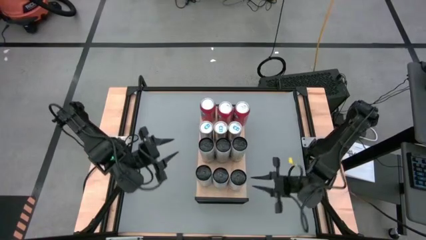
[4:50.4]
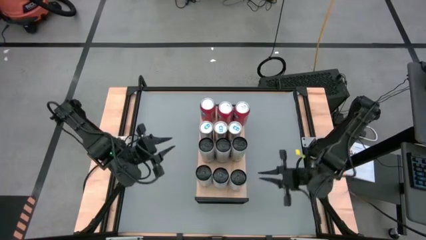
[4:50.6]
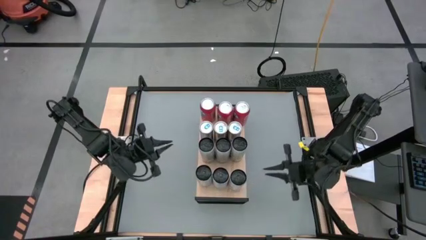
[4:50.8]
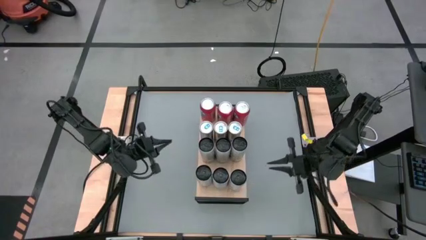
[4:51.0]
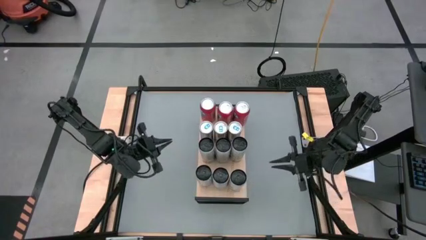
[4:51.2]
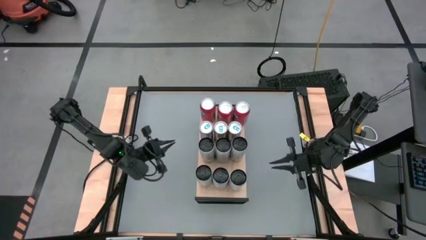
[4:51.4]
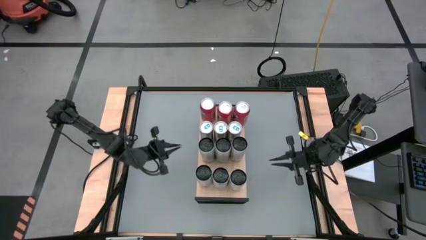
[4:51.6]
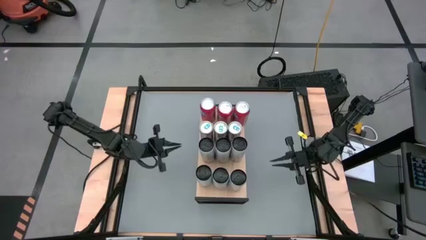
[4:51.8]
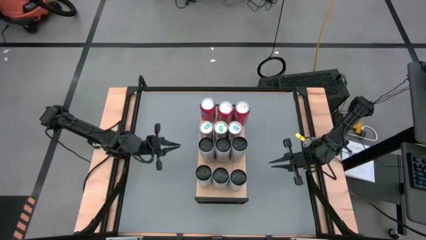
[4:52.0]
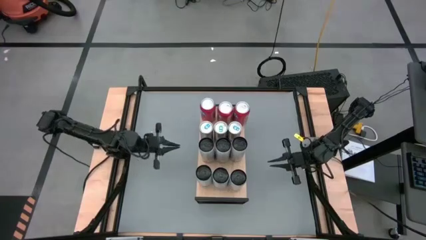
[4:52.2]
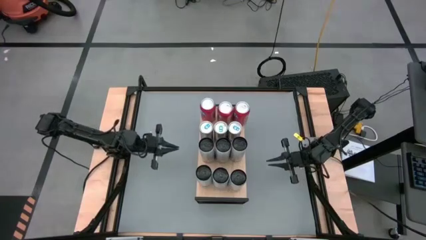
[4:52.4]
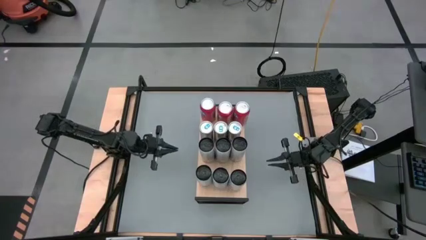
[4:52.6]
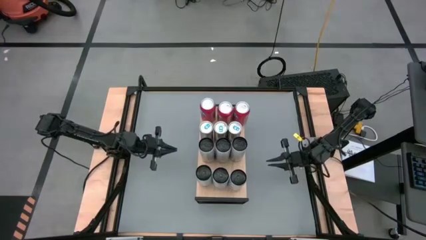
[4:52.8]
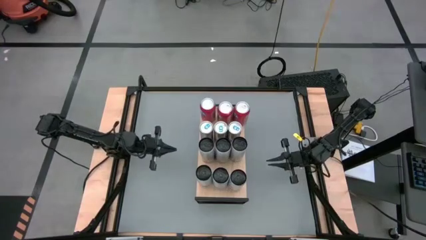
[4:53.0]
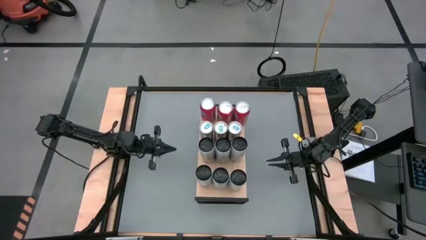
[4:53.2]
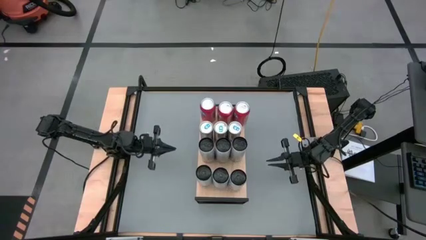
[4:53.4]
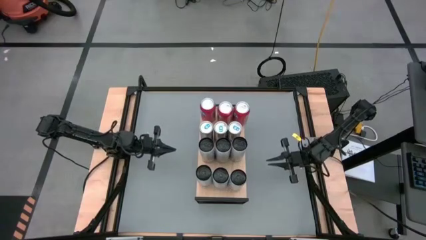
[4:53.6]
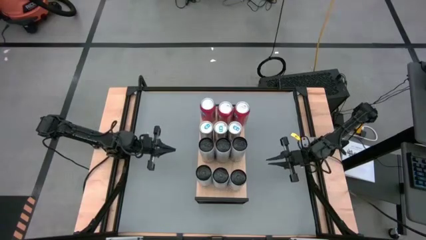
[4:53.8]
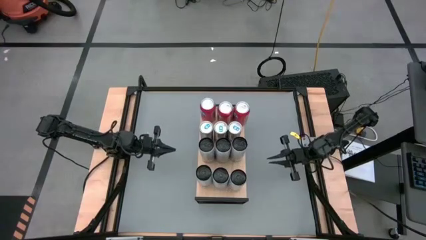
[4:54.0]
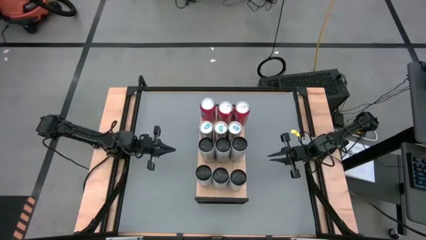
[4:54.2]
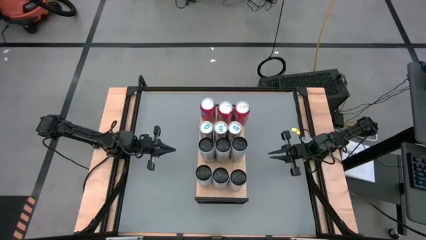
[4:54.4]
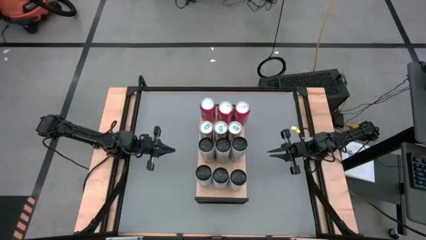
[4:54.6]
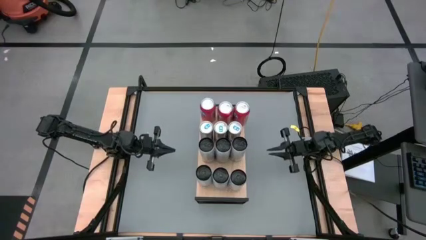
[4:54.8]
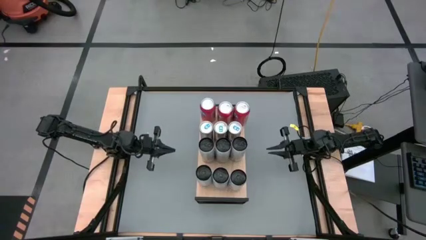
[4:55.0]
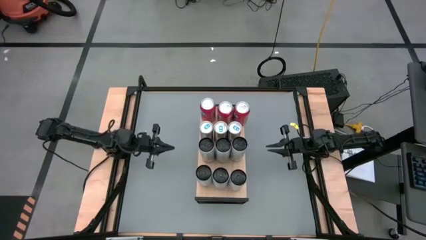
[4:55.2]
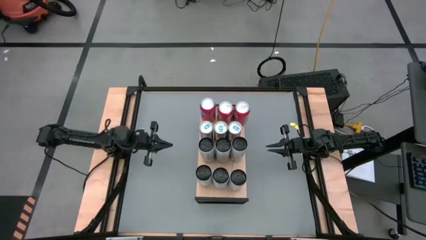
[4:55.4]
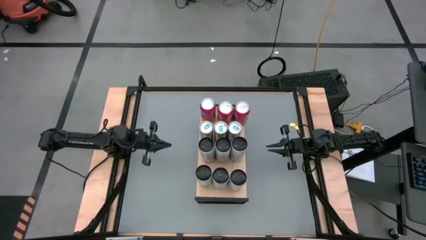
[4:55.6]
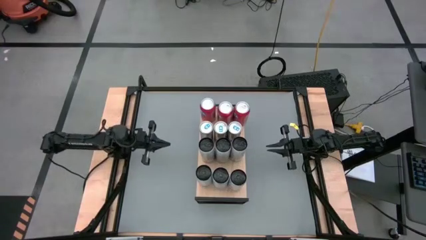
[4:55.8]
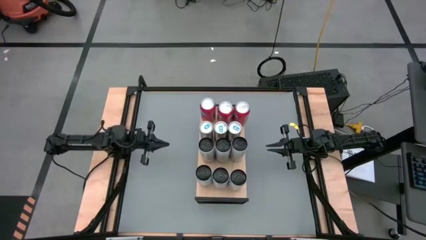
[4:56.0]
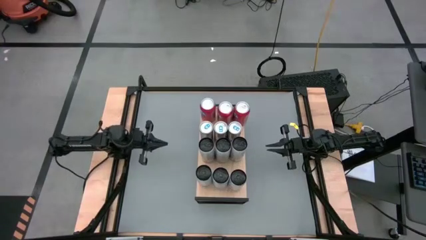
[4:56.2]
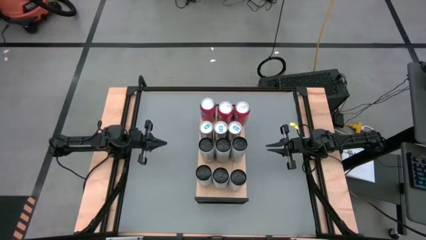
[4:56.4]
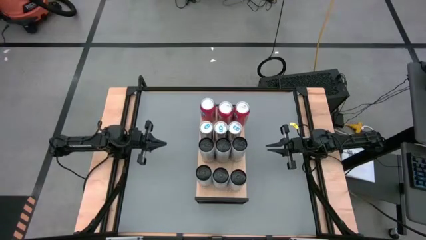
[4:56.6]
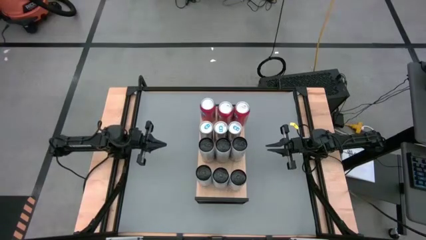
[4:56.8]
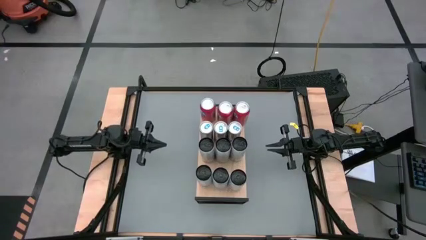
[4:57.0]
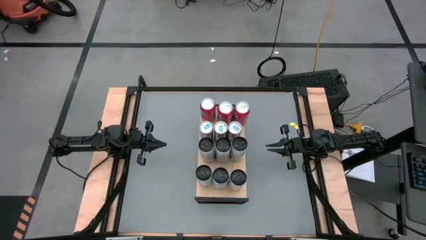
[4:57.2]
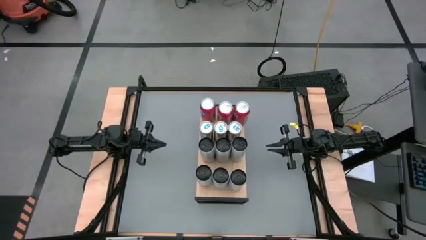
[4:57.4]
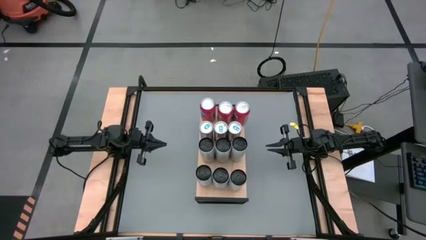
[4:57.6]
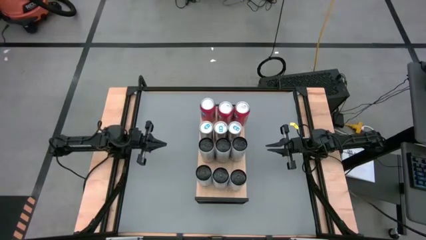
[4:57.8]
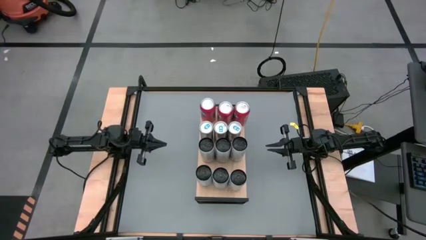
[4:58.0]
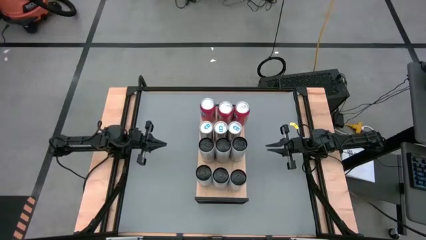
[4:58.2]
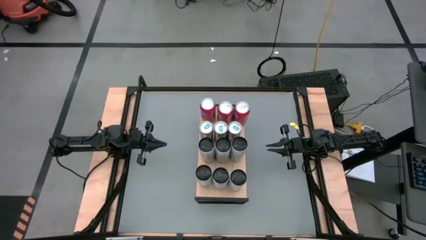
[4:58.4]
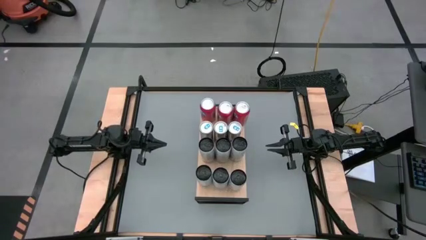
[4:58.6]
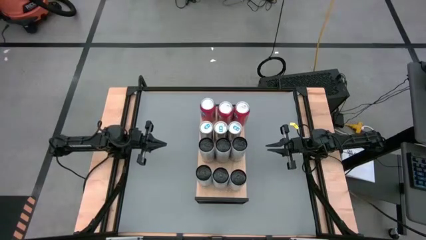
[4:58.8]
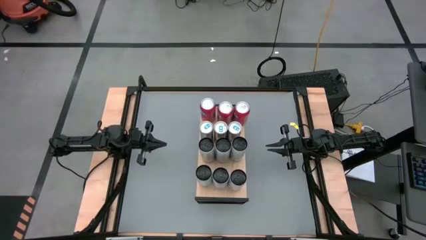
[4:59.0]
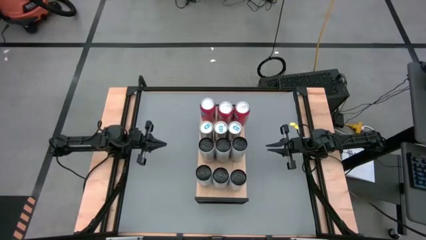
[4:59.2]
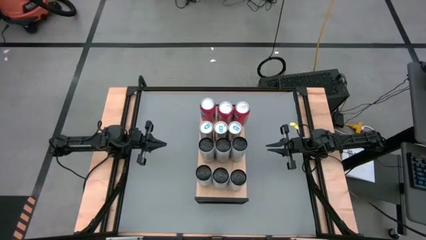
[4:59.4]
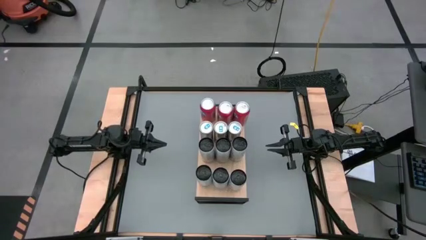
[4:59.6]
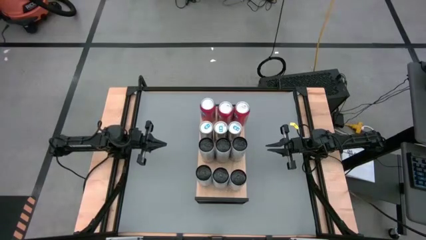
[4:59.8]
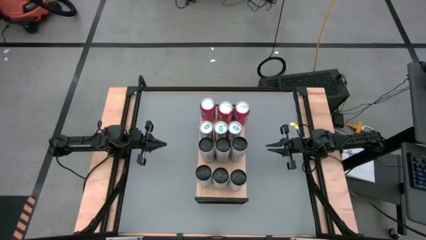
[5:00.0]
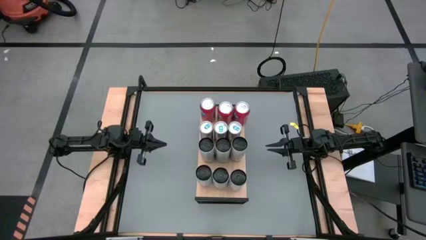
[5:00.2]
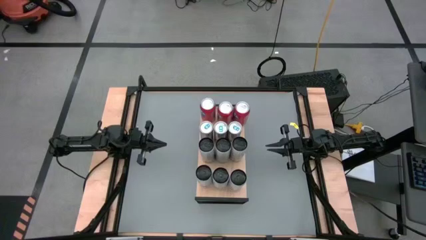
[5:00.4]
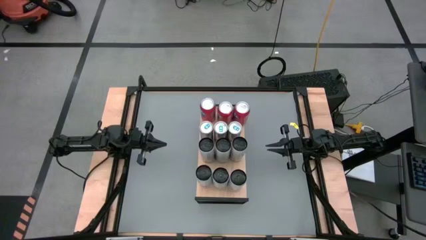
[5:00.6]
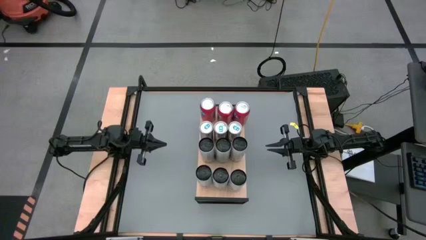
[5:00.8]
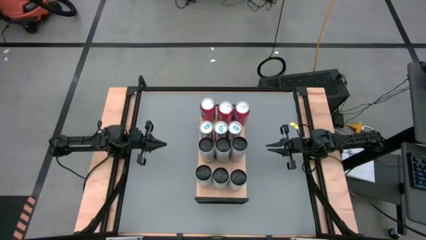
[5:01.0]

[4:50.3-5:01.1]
Task: Place canned beverage on shelf
Return to Home Position
